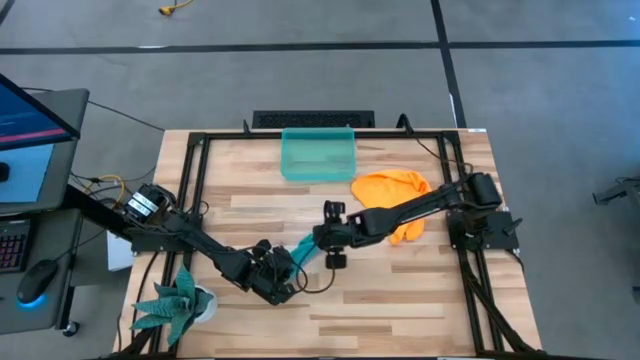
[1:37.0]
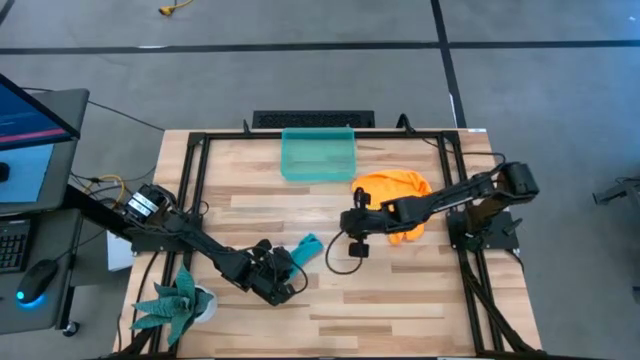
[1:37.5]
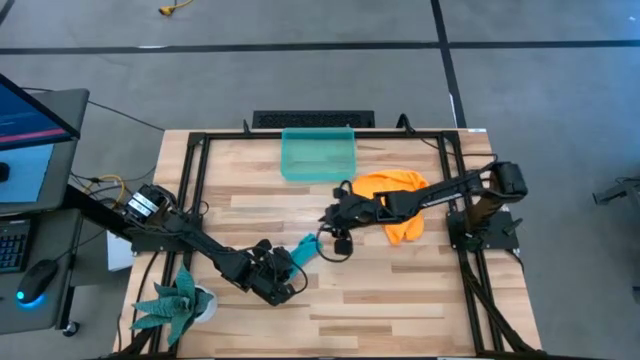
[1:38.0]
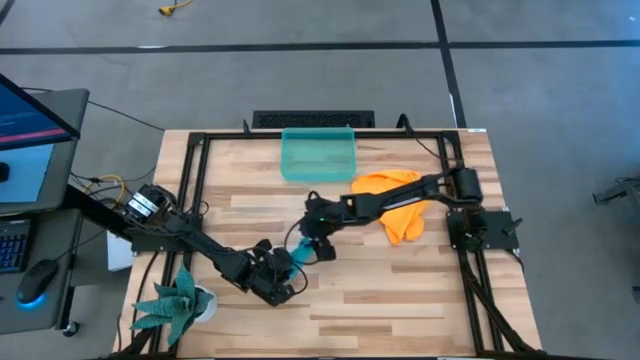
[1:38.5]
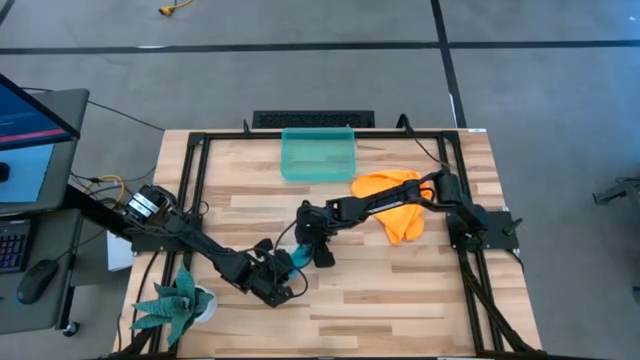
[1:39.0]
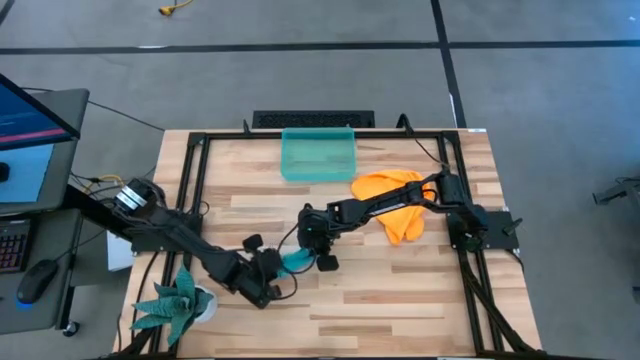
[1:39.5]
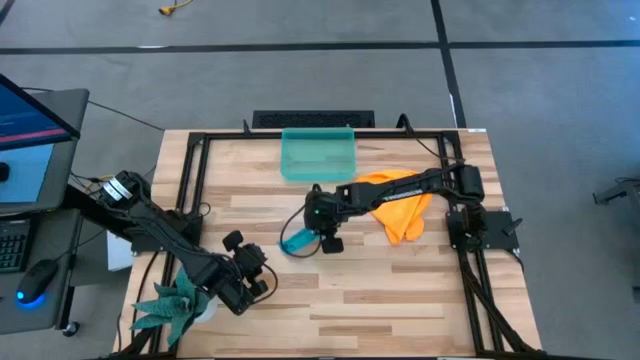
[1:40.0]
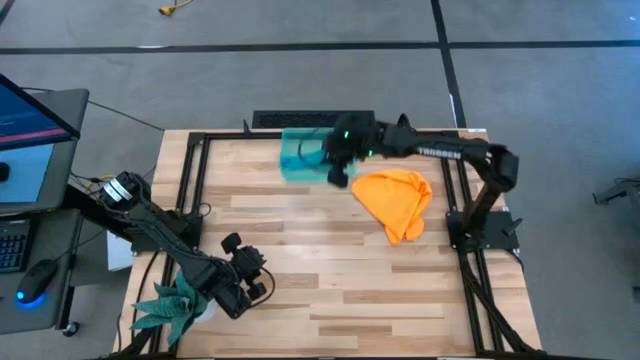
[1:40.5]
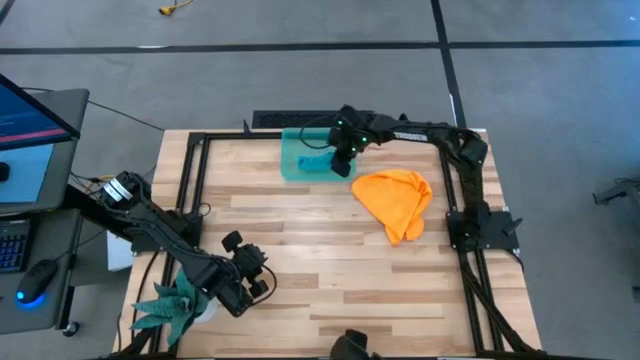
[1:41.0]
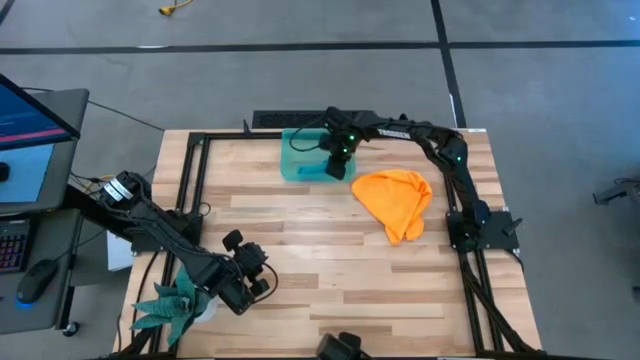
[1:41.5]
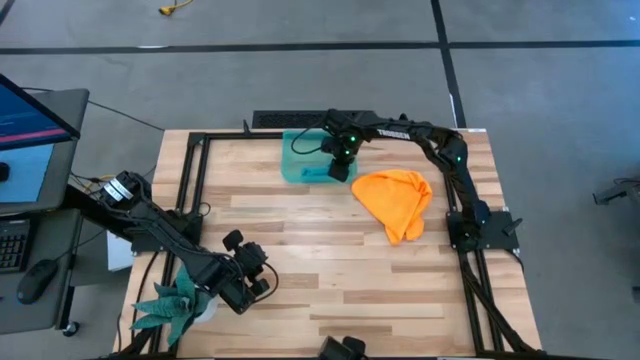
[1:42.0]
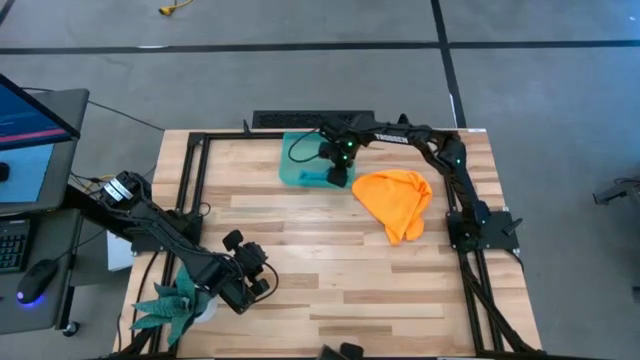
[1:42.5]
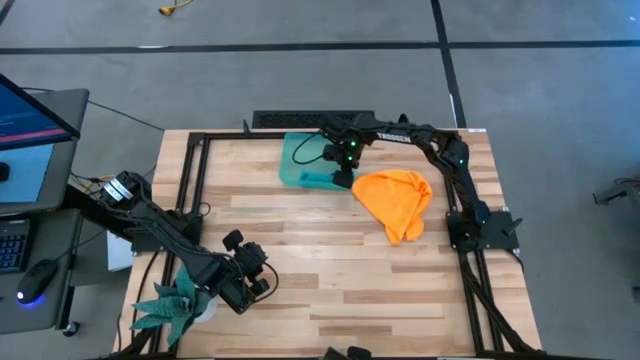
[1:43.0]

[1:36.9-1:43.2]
Task: Roll microfiber towels into tight, uniform cylinder then place into a basket
Put the blue microfiber cloth into the green bin

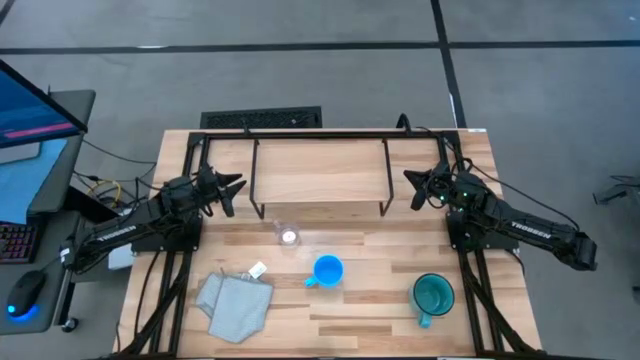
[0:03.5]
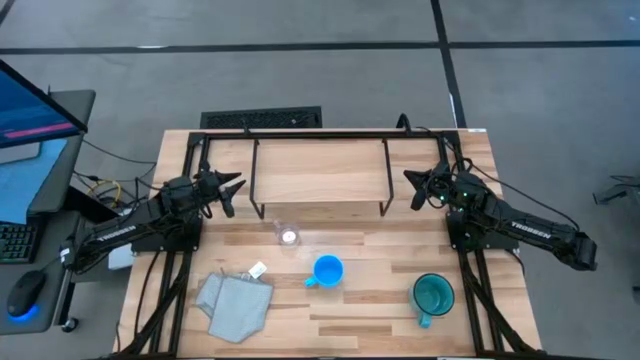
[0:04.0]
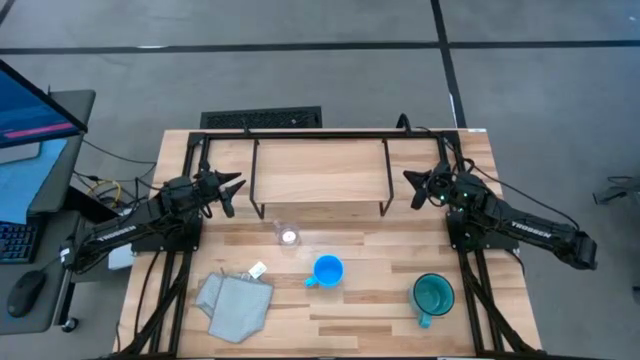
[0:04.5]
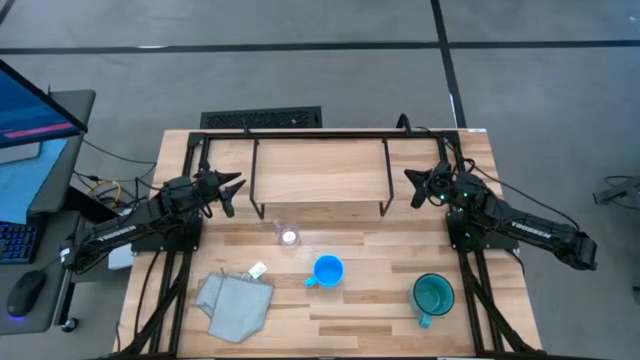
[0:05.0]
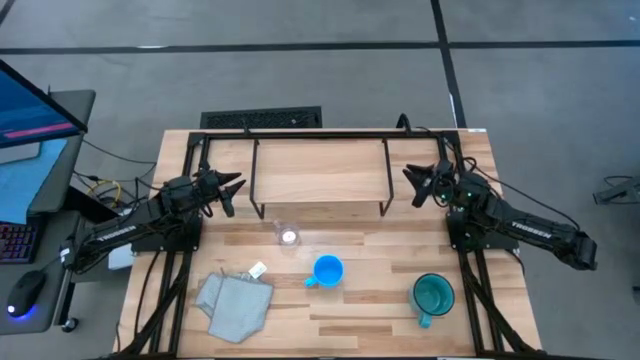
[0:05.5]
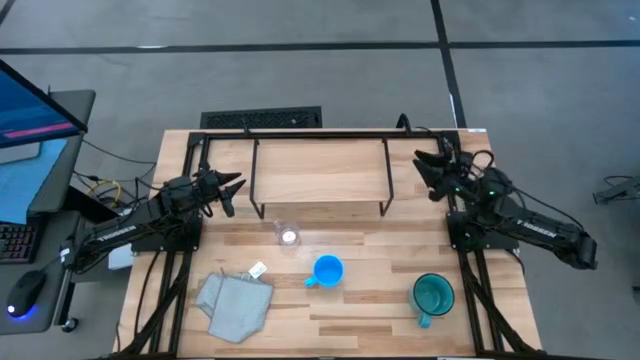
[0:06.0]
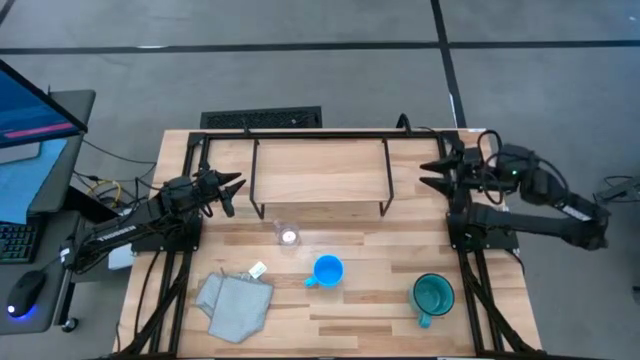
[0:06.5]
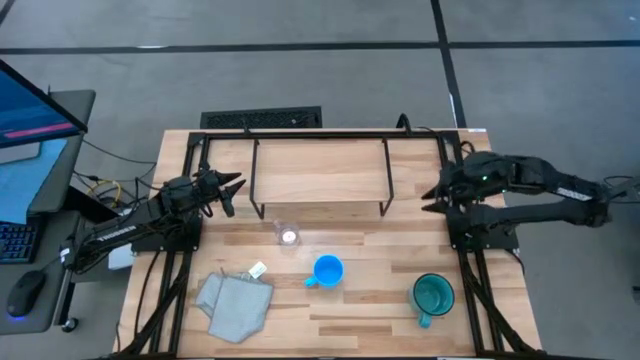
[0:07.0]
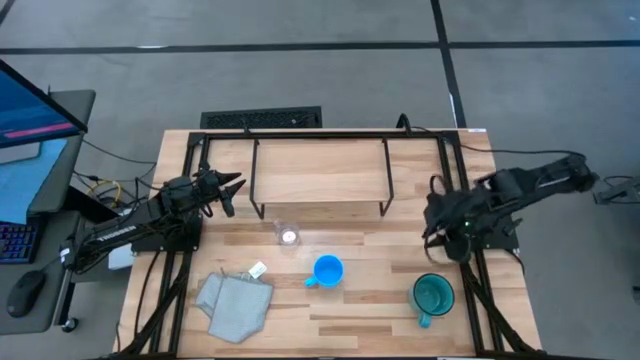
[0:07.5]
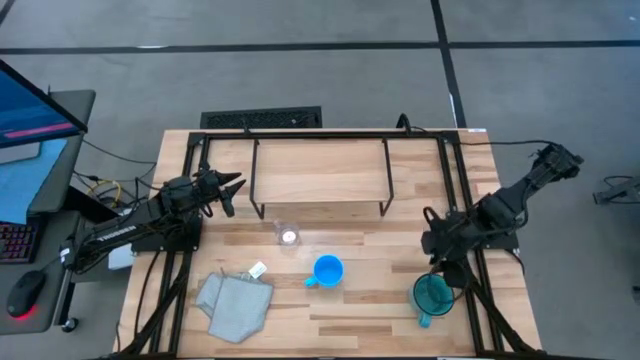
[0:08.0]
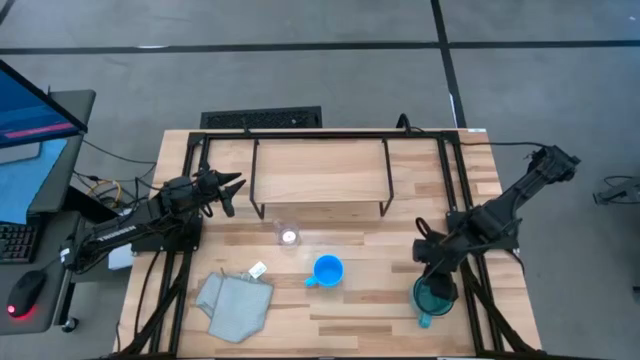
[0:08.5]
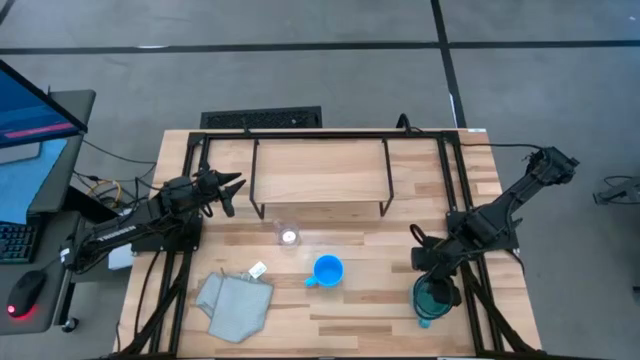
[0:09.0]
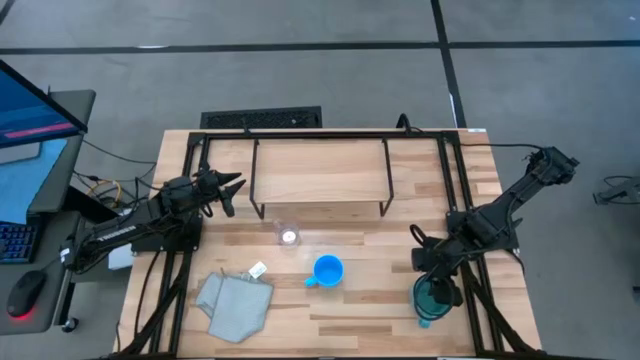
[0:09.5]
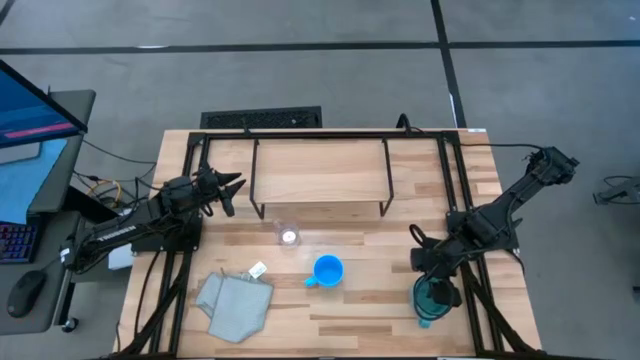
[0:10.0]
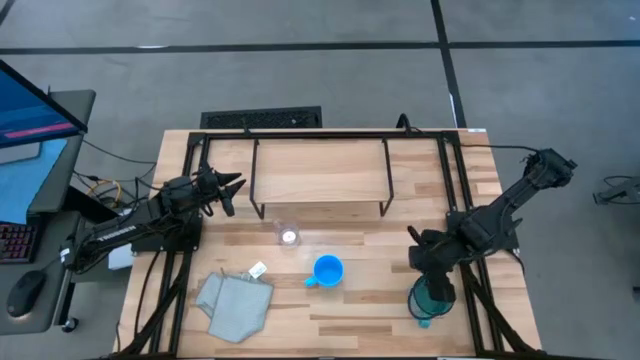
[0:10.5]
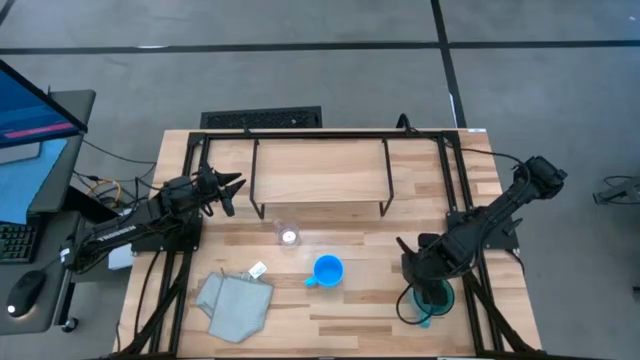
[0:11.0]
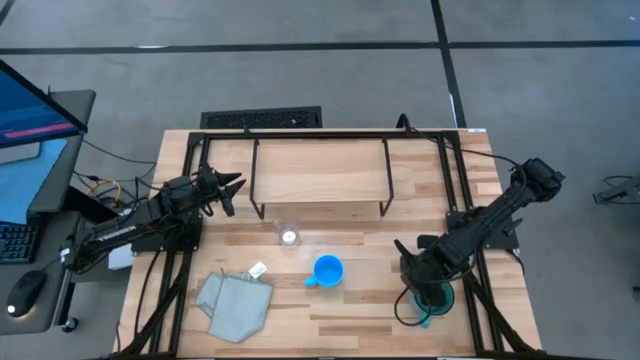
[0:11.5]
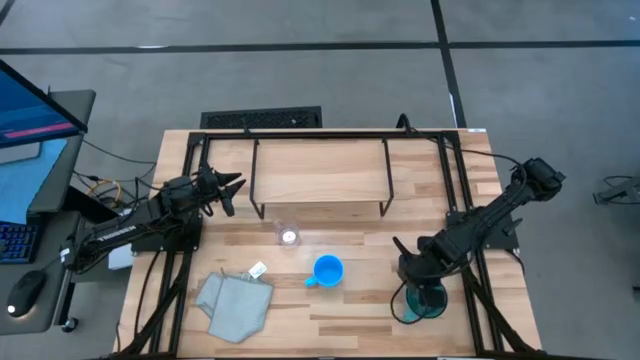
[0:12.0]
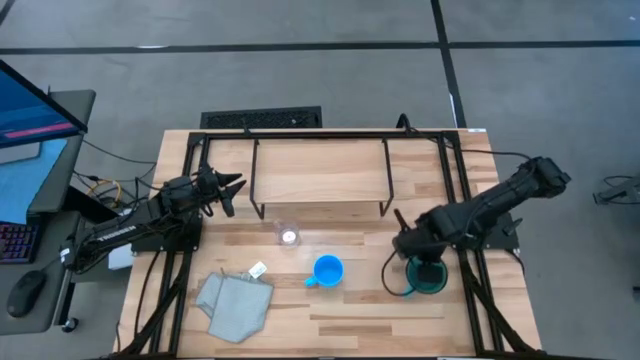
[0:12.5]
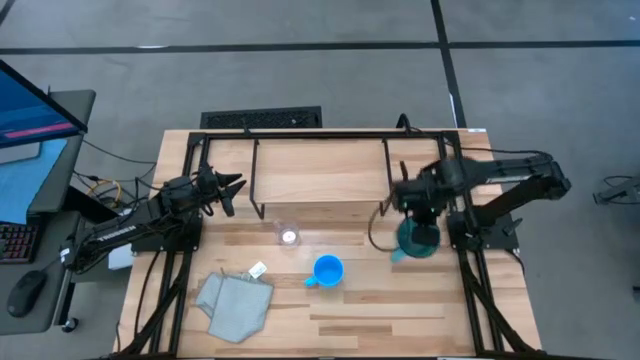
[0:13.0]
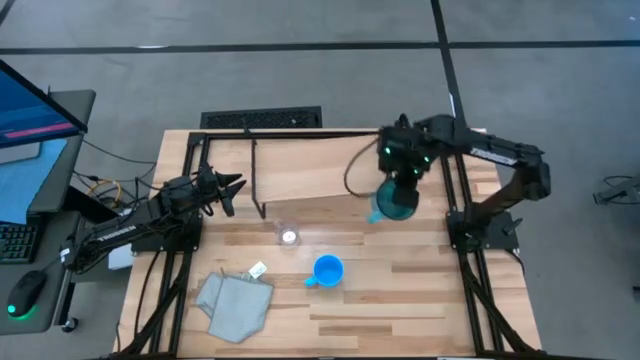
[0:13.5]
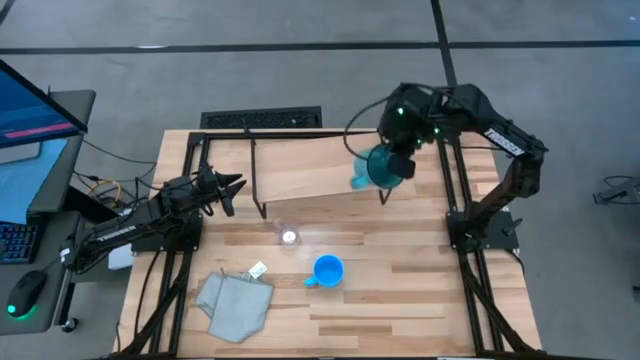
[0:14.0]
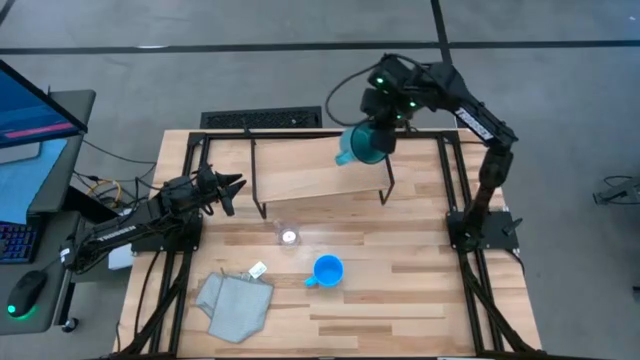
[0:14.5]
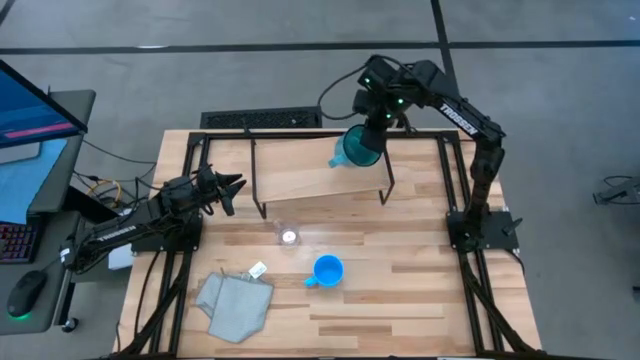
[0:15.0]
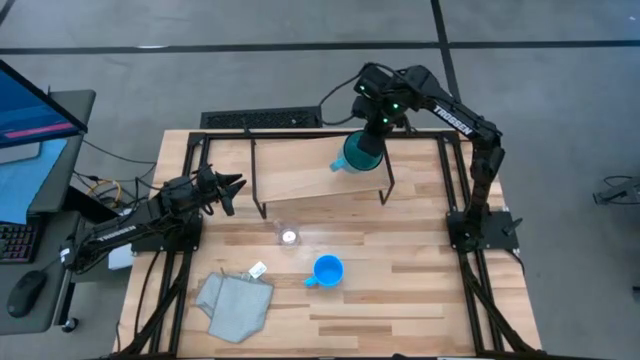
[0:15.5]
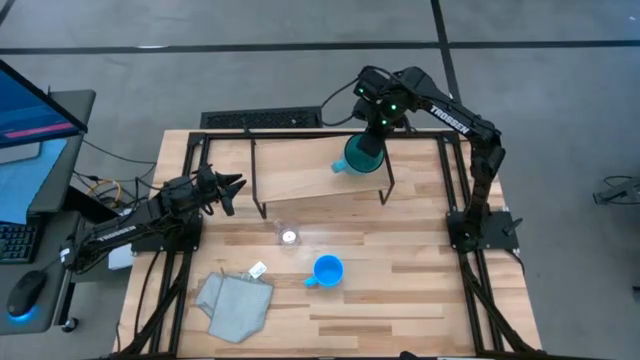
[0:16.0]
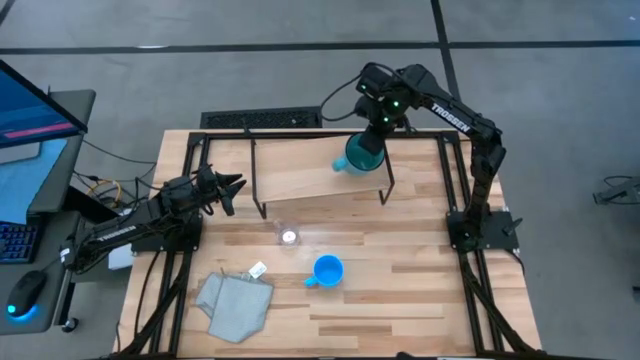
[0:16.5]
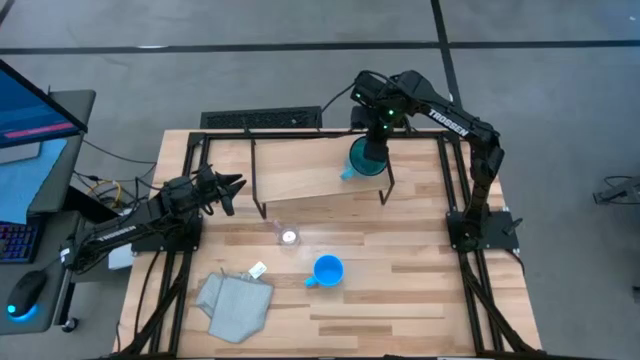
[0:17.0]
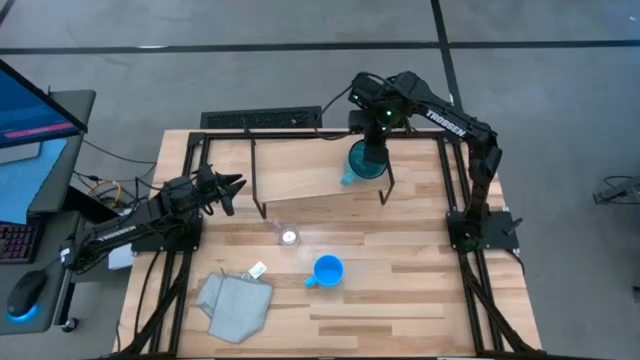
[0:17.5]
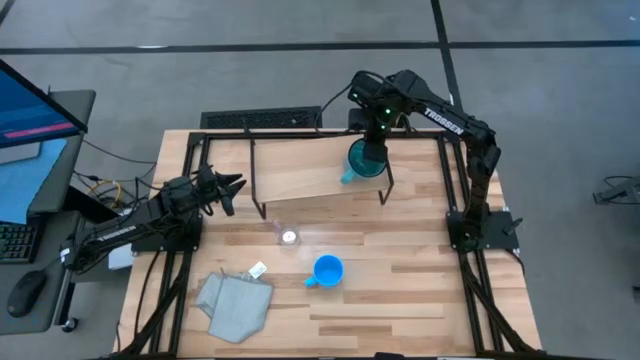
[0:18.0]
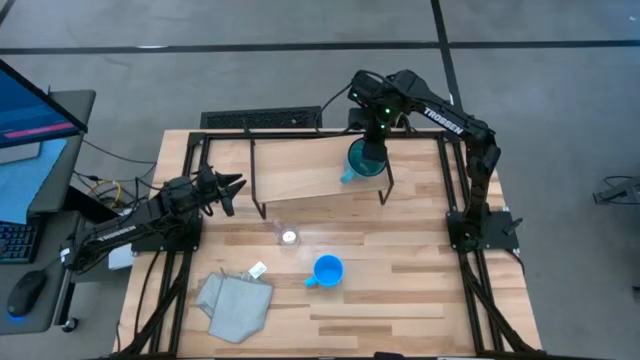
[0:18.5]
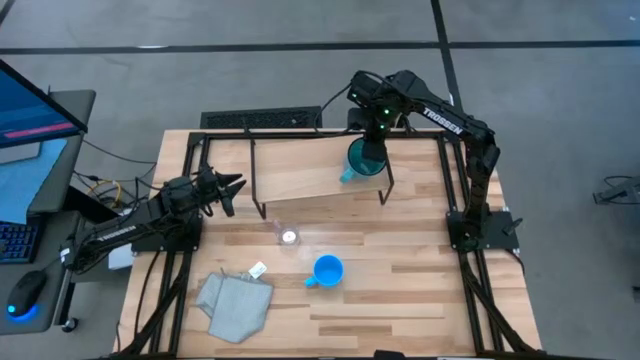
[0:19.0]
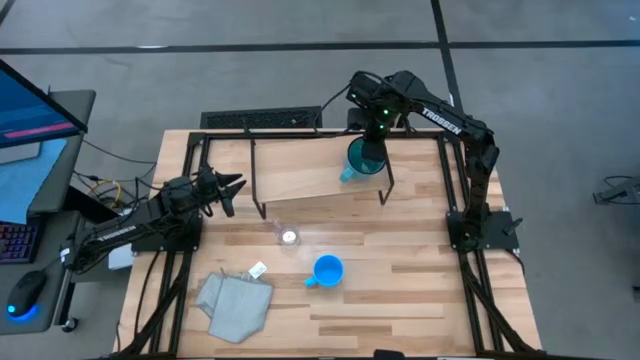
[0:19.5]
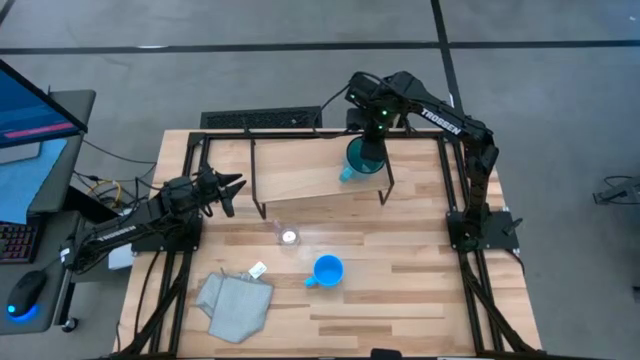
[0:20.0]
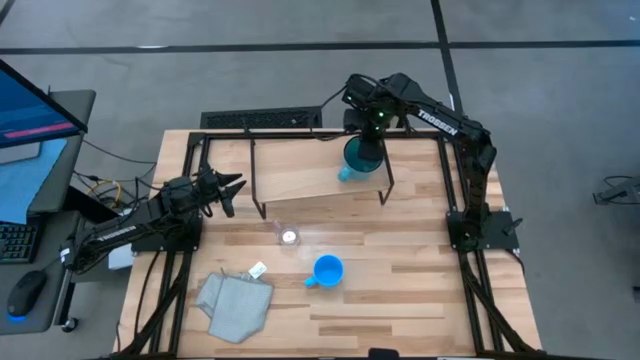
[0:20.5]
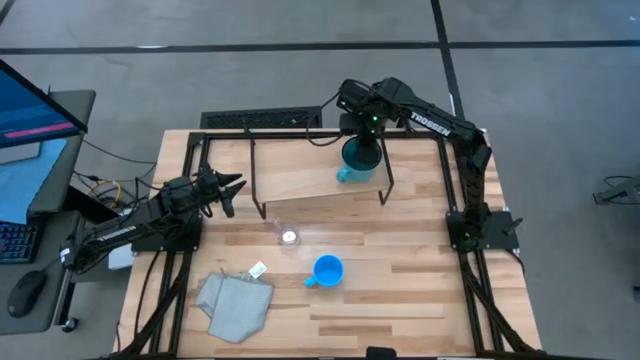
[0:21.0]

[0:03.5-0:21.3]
Task: Stack small to large cups/mugs on shelf
Put the green mug on the shelf
